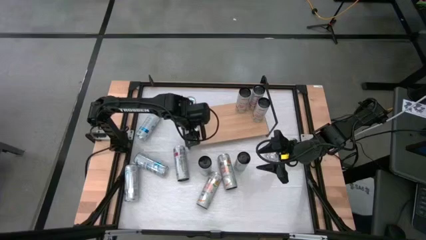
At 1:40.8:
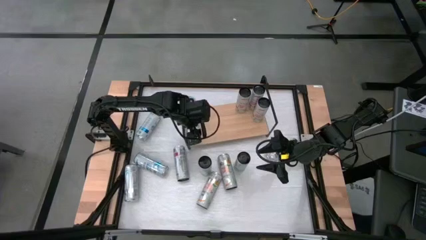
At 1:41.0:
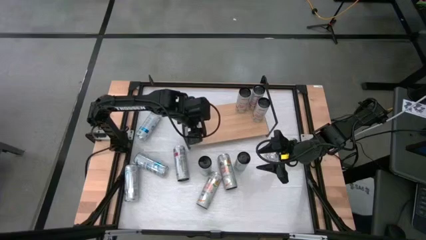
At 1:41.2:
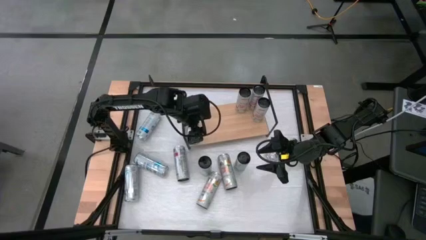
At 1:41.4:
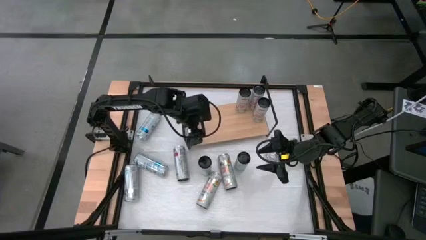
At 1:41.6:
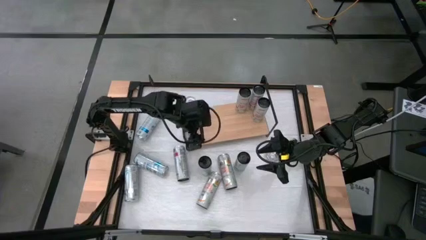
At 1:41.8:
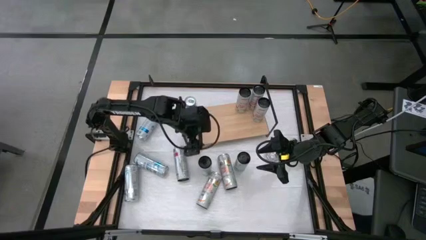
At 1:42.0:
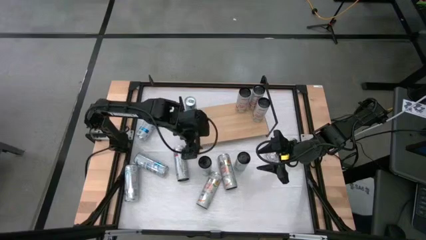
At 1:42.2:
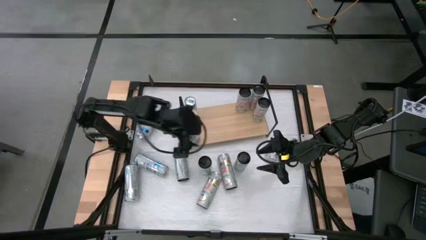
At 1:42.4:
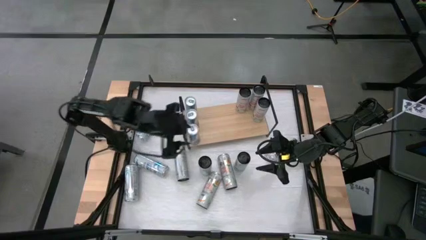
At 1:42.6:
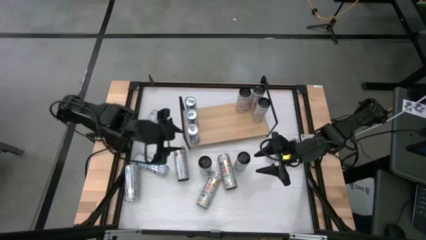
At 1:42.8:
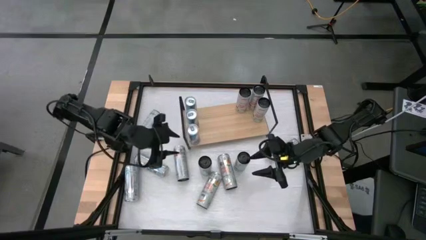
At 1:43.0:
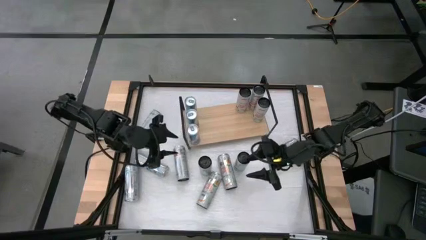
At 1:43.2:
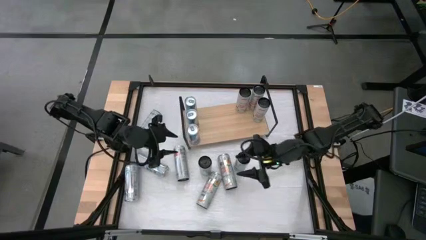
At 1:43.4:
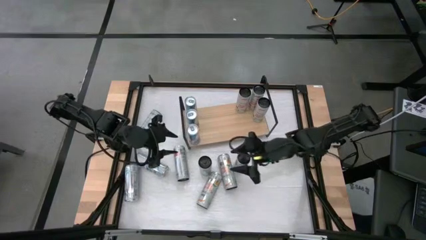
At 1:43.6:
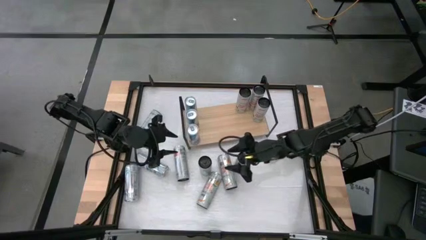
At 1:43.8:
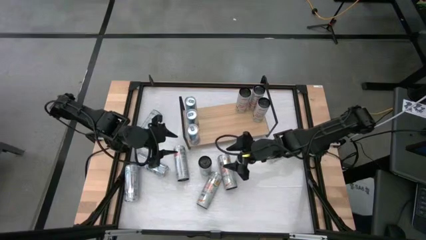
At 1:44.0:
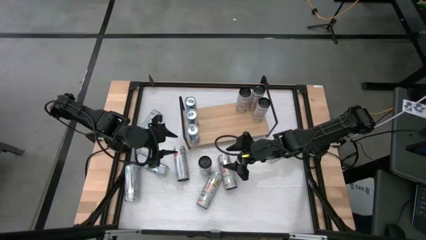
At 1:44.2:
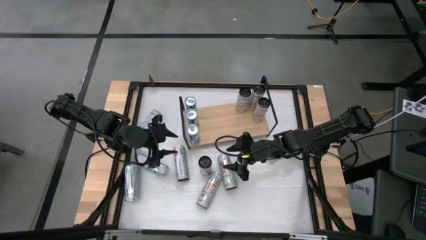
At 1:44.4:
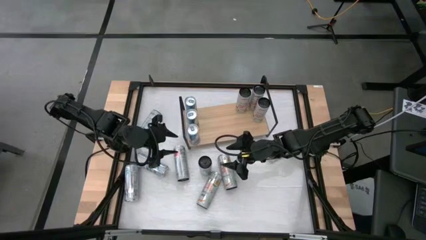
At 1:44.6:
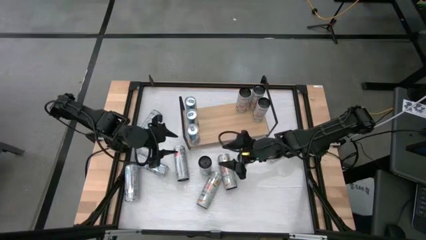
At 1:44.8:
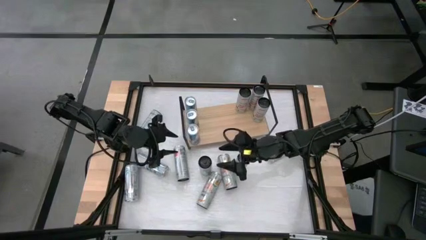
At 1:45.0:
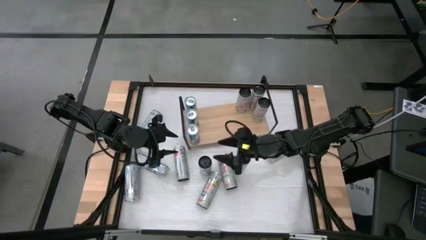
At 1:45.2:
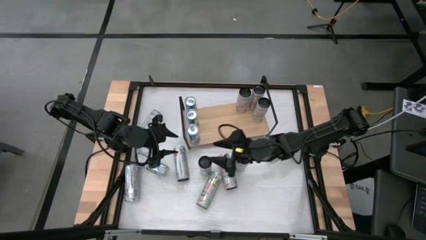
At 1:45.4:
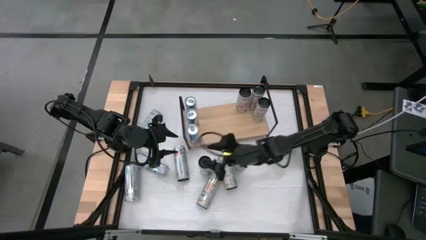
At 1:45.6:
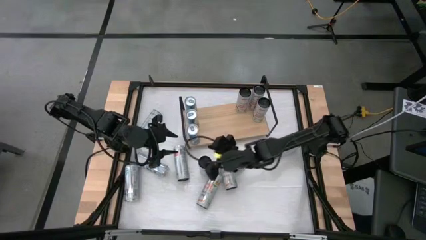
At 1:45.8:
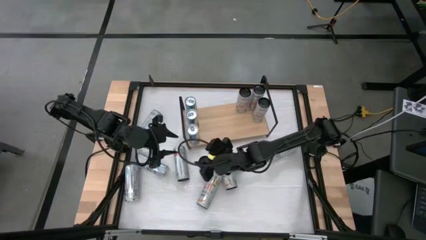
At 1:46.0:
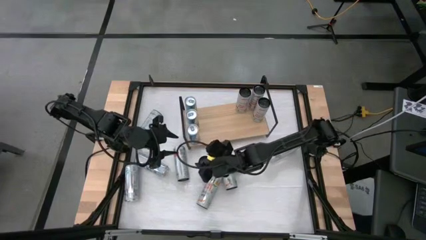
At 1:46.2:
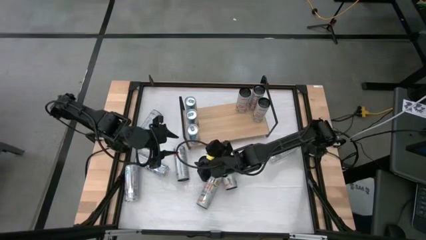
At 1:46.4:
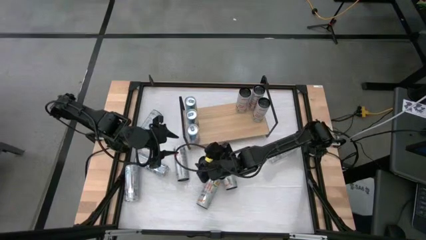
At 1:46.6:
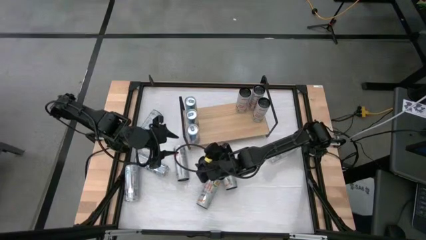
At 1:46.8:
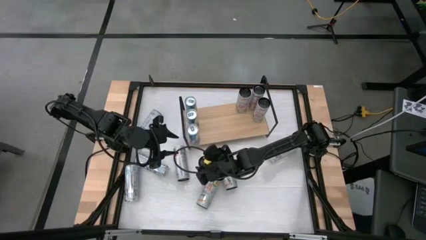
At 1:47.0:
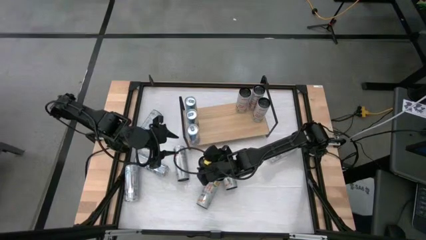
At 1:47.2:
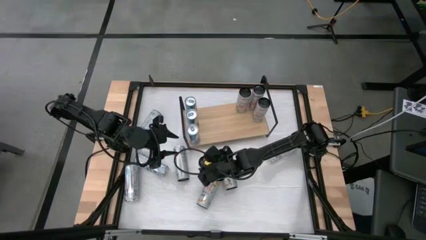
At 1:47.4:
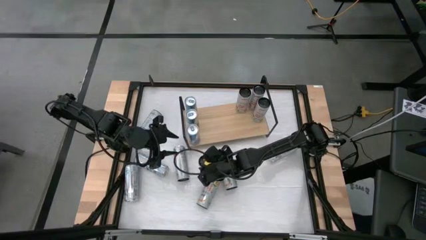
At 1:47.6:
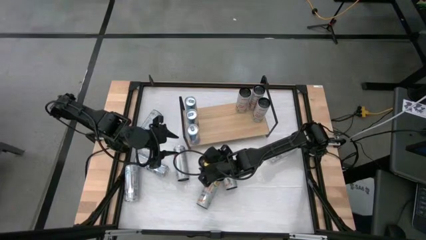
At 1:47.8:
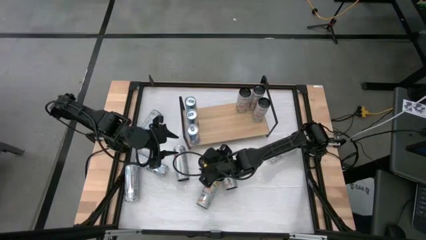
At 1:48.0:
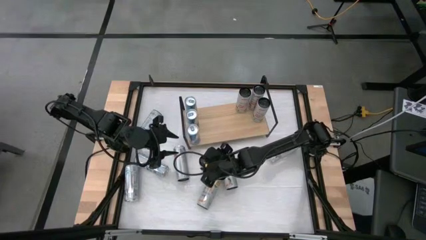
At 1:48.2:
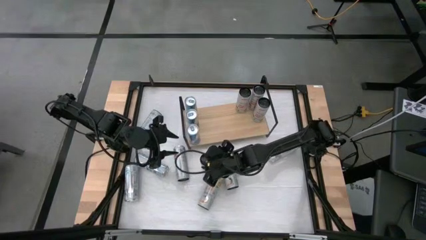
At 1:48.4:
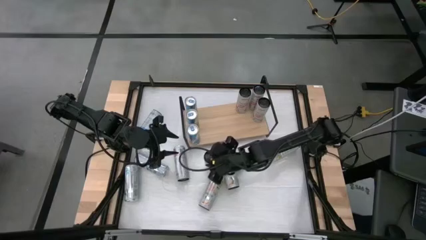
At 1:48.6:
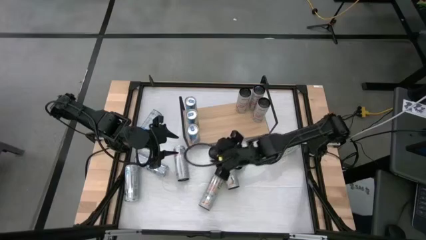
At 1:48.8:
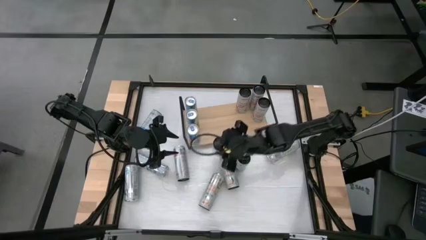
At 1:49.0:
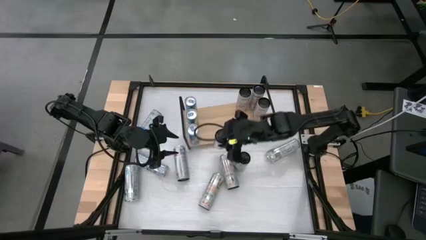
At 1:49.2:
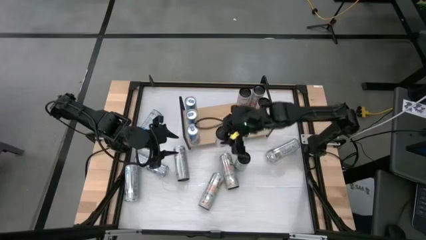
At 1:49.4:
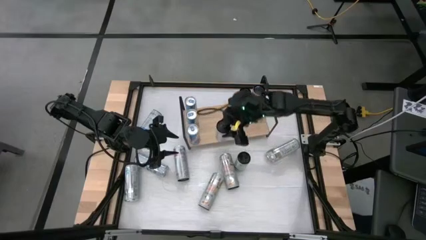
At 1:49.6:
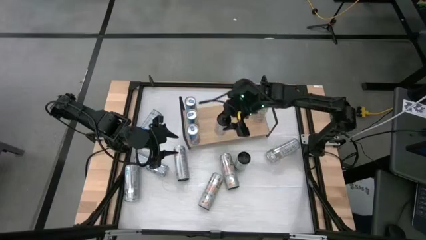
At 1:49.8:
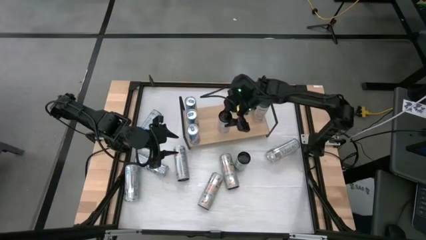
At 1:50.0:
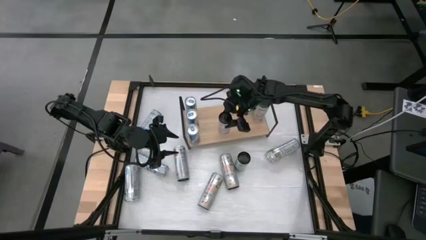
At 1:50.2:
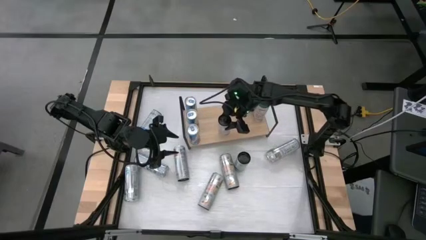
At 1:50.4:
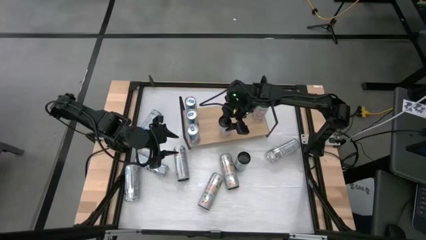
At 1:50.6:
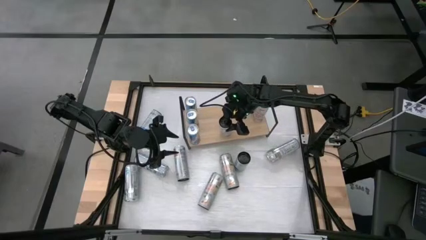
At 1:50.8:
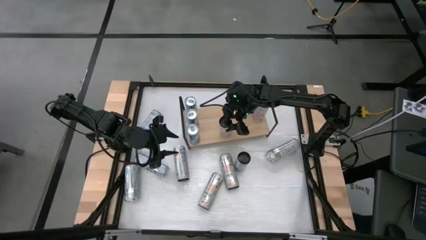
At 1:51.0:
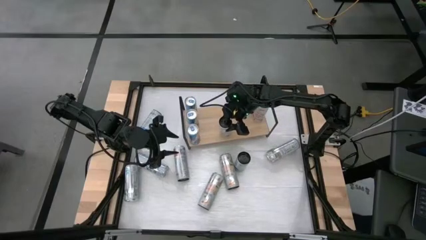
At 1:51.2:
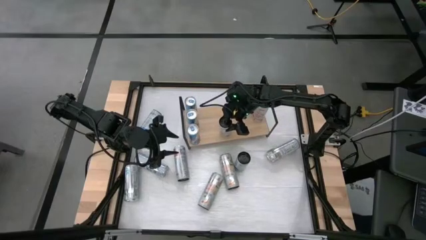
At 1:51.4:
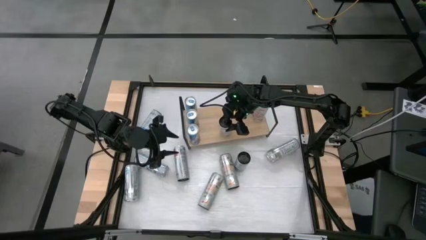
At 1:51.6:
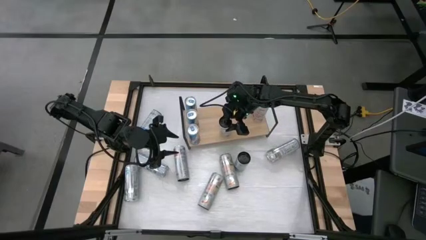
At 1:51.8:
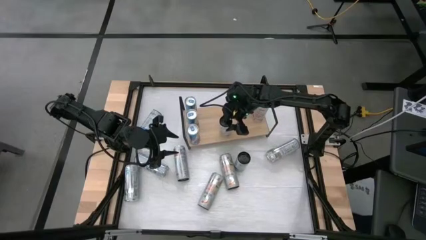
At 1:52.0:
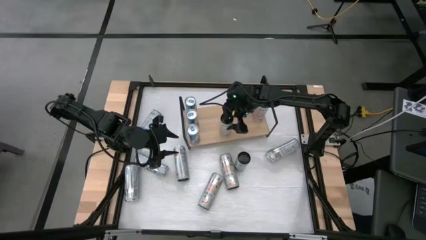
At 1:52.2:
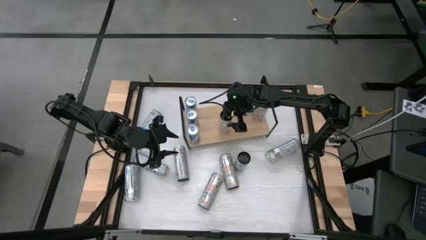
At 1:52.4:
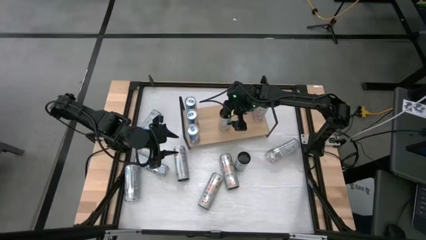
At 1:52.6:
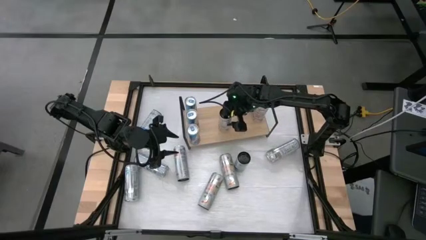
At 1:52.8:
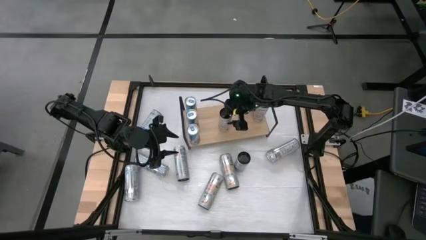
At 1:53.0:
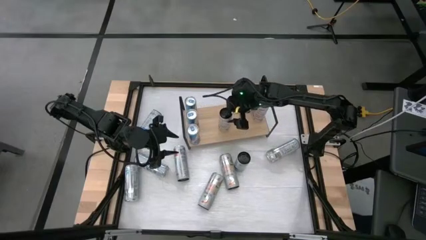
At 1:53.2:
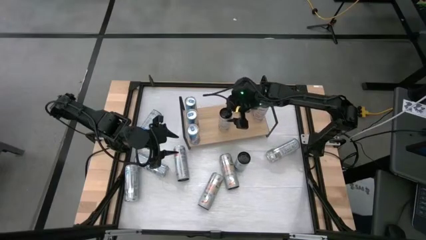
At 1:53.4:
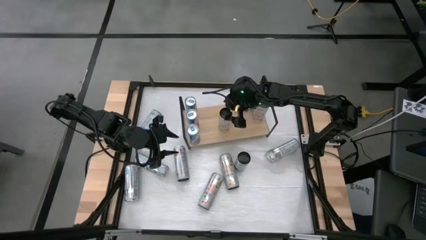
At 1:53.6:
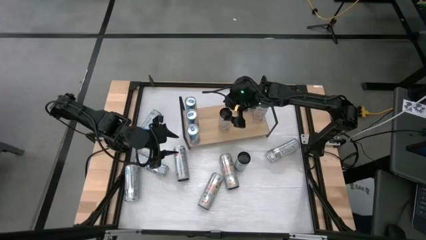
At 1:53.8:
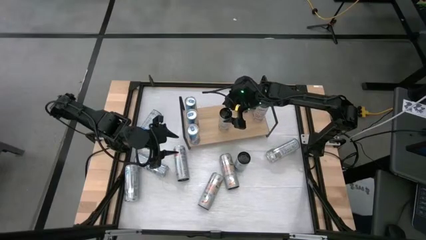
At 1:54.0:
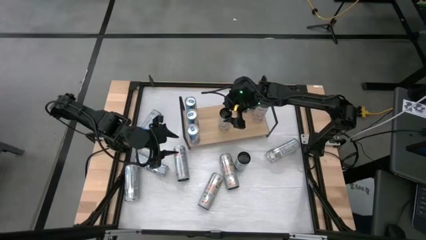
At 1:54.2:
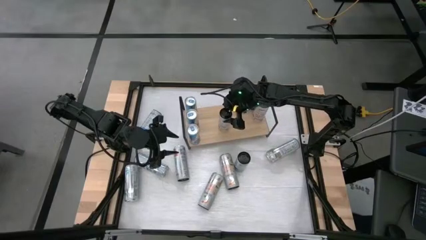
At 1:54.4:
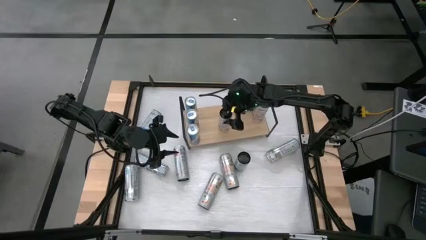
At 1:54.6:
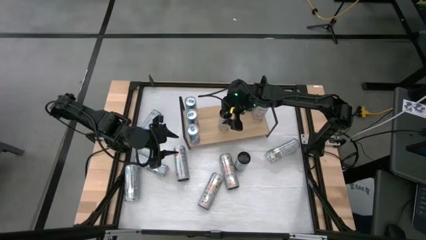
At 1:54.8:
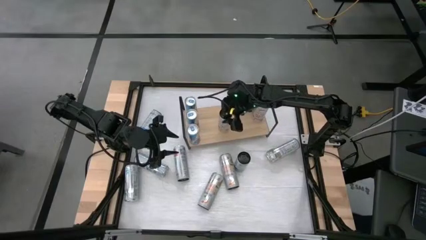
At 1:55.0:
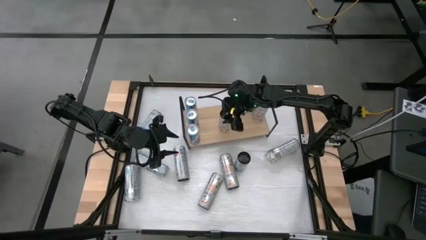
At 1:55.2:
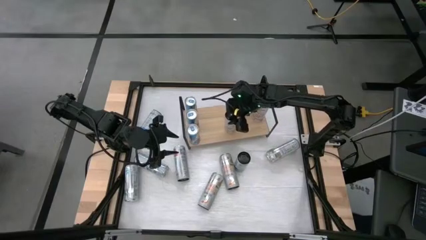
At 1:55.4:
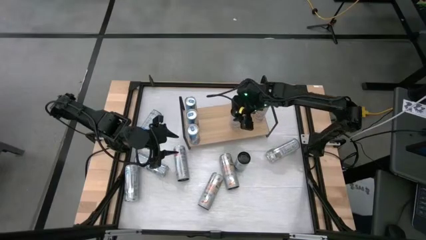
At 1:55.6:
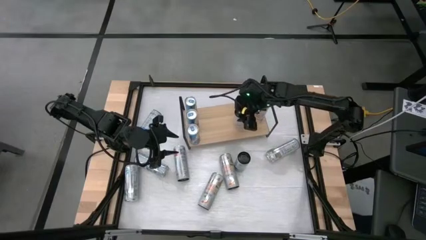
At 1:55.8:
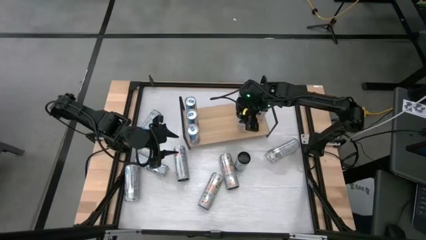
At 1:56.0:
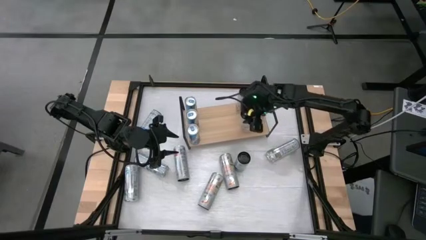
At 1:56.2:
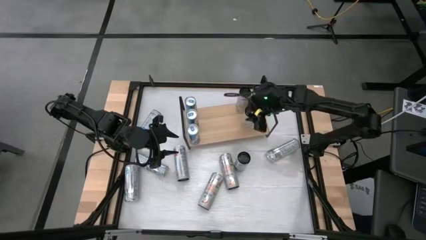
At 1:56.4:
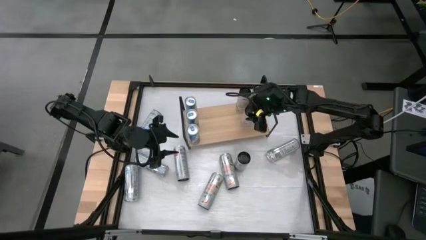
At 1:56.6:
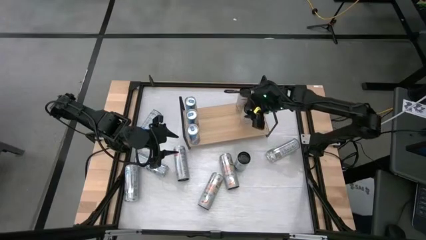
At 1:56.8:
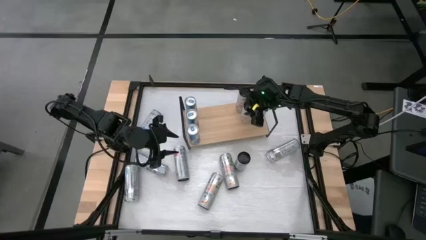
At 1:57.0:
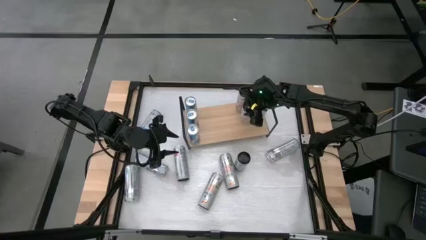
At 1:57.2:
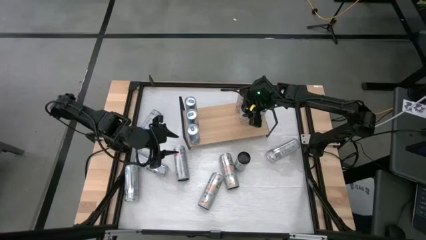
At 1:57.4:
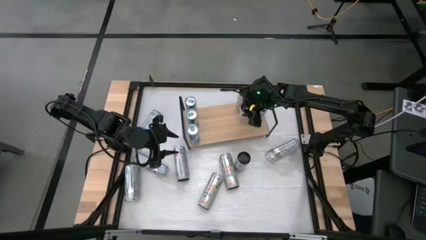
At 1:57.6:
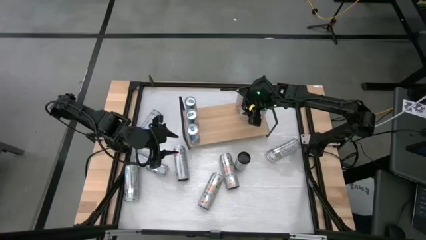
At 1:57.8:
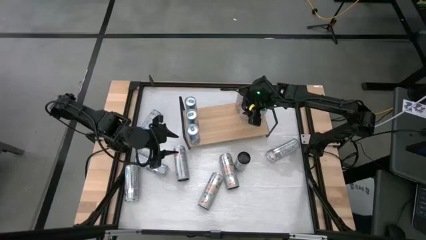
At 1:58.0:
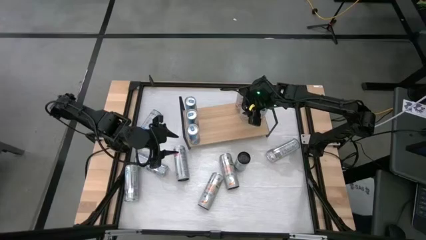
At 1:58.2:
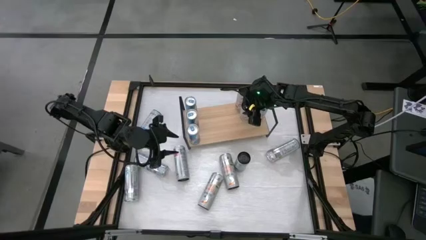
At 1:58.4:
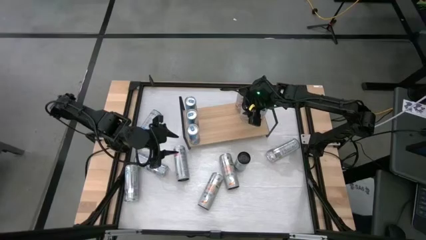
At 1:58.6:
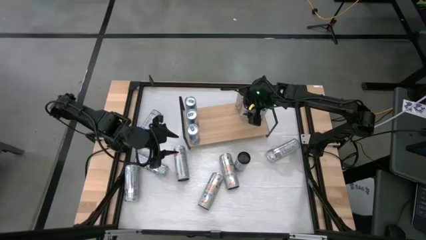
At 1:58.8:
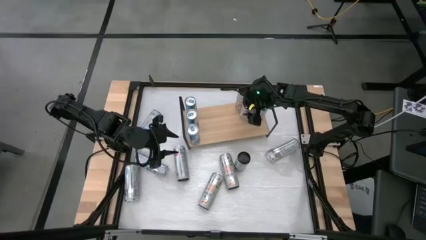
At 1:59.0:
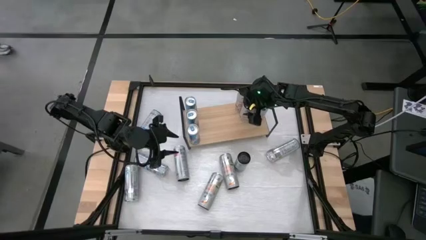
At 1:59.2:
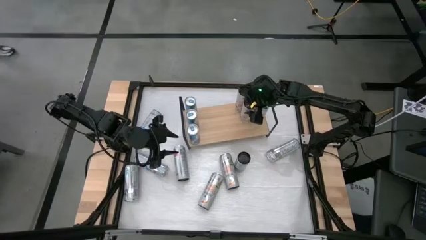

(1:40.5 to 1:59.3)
Task: Place canned beverage on shelf
Put the white-pink soda can on the shelf with the other white-pink soda can
